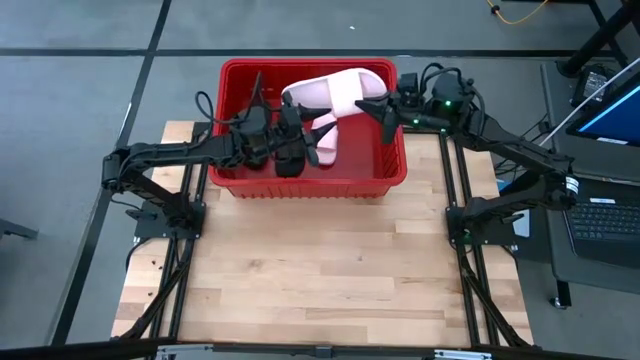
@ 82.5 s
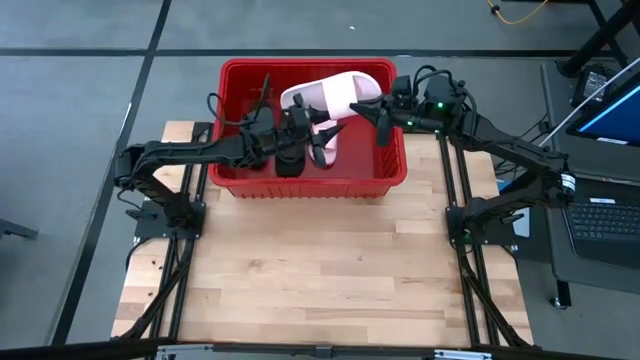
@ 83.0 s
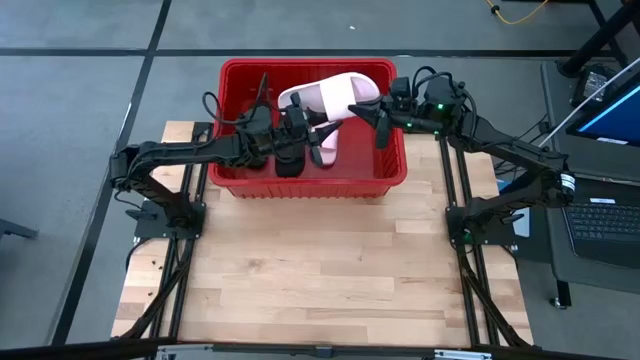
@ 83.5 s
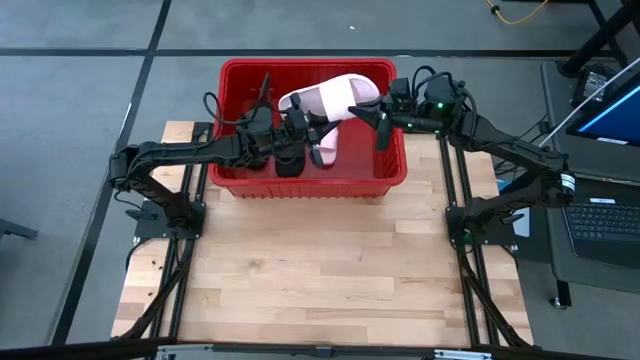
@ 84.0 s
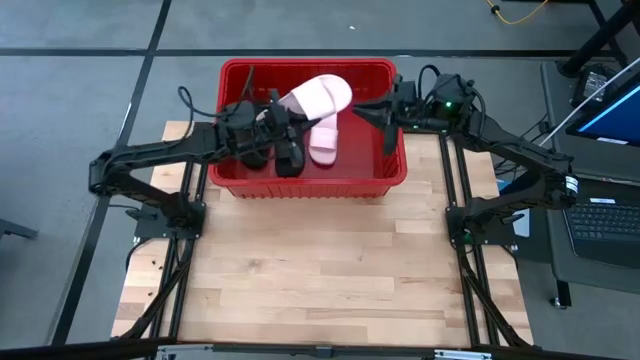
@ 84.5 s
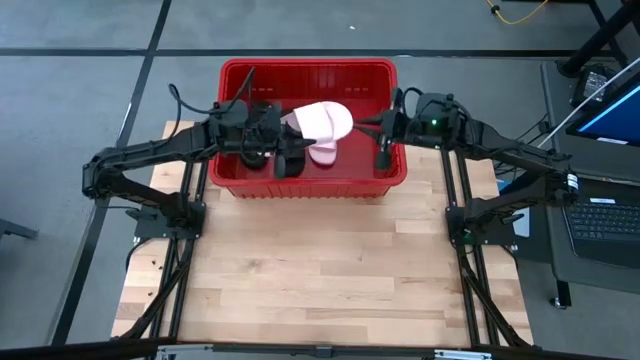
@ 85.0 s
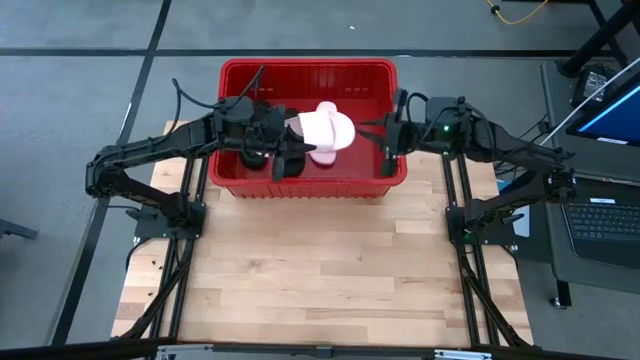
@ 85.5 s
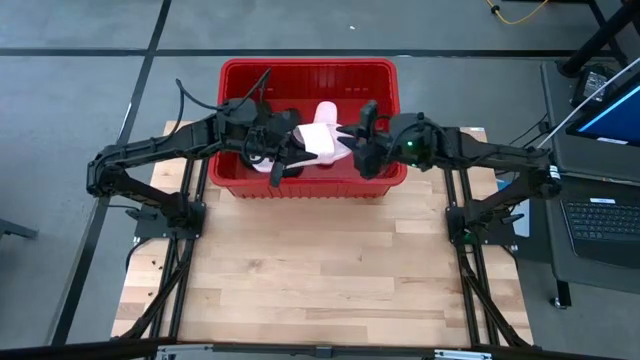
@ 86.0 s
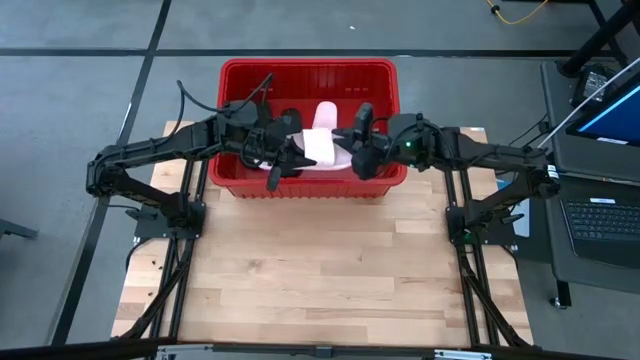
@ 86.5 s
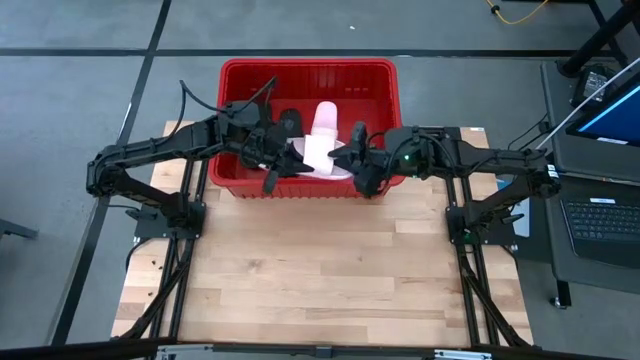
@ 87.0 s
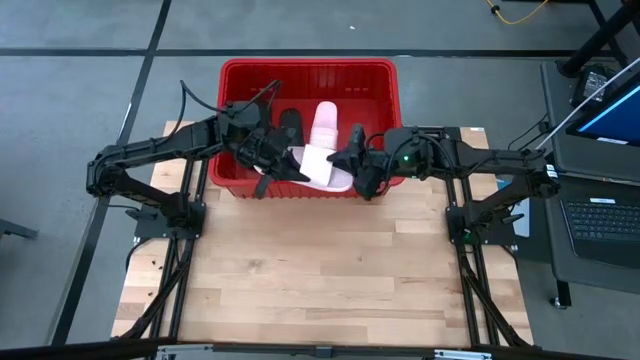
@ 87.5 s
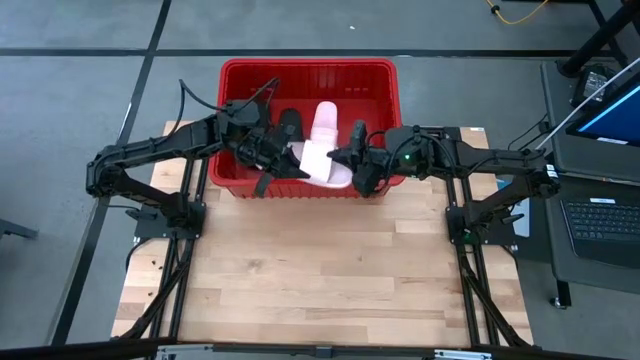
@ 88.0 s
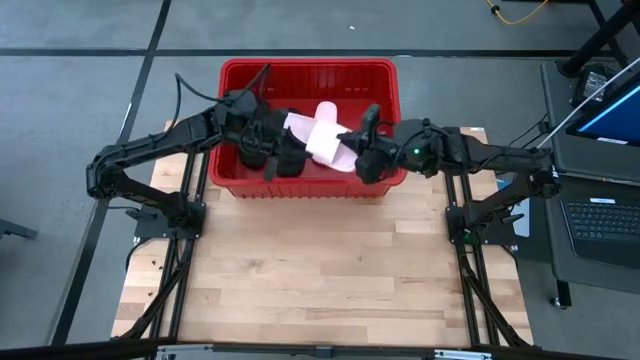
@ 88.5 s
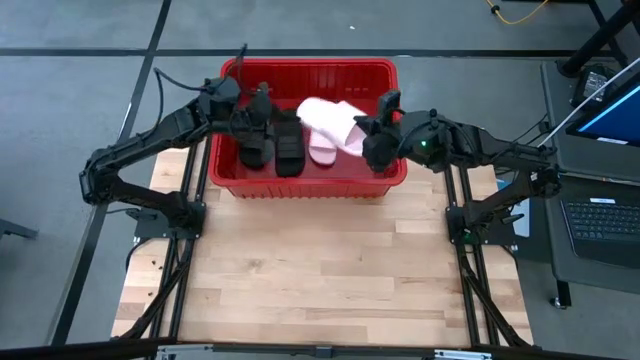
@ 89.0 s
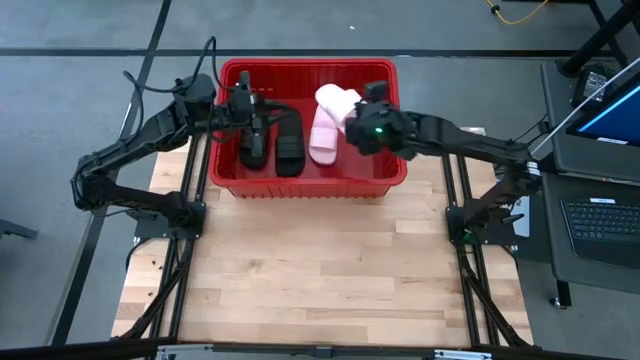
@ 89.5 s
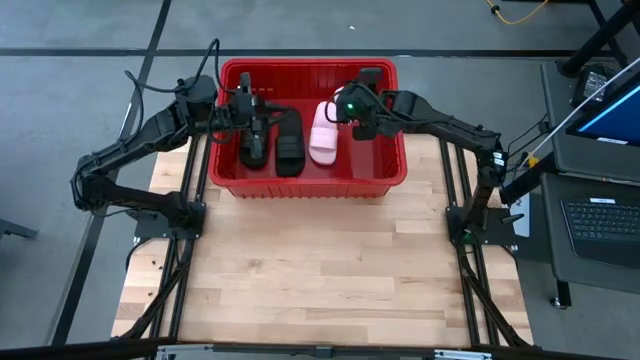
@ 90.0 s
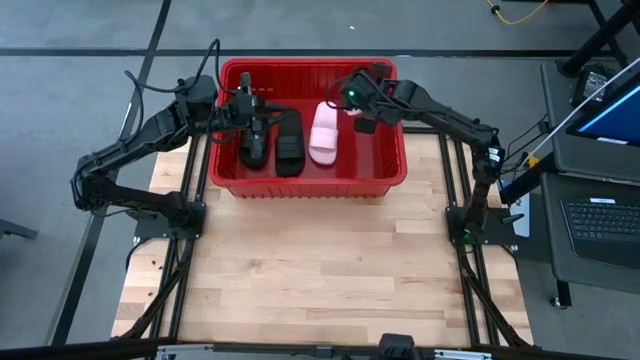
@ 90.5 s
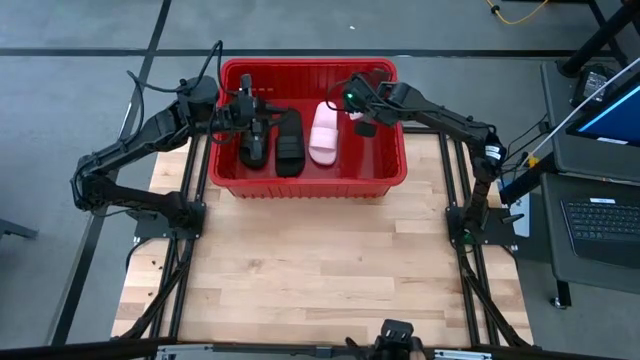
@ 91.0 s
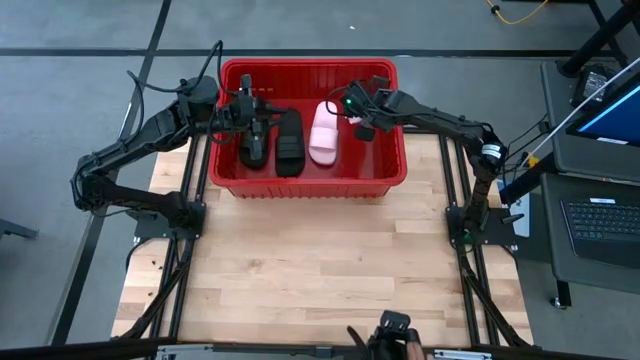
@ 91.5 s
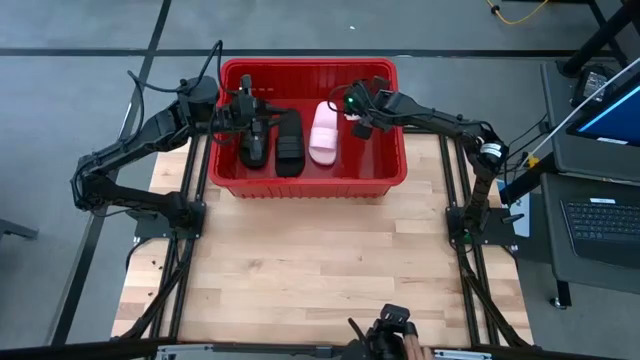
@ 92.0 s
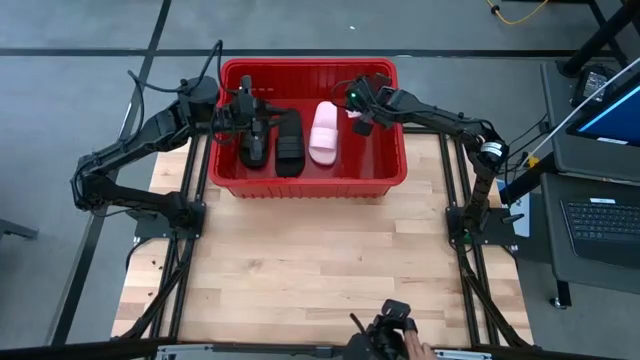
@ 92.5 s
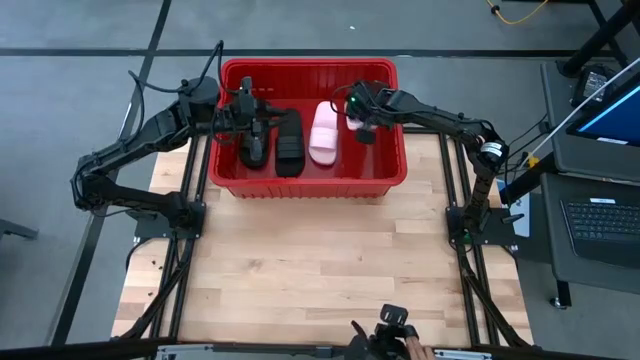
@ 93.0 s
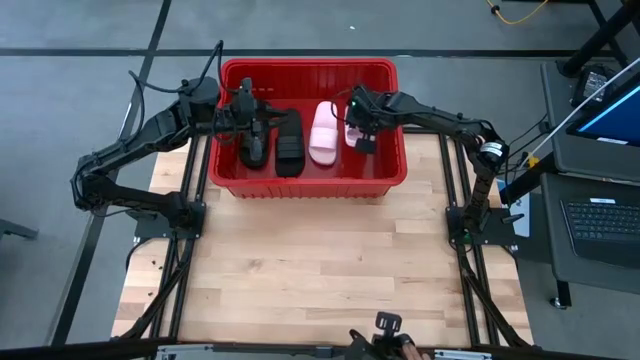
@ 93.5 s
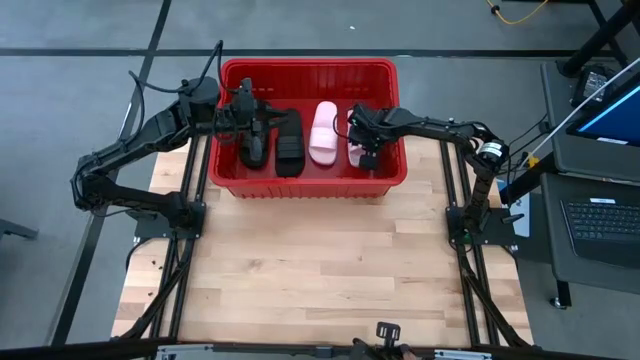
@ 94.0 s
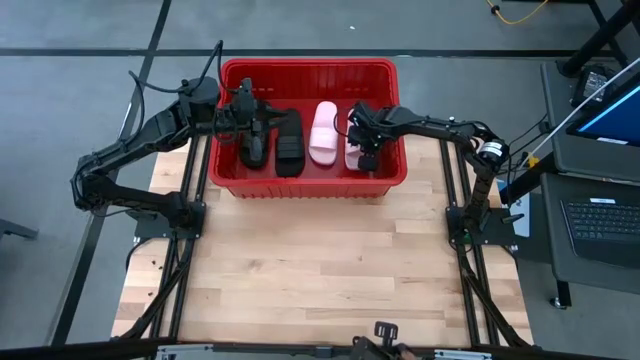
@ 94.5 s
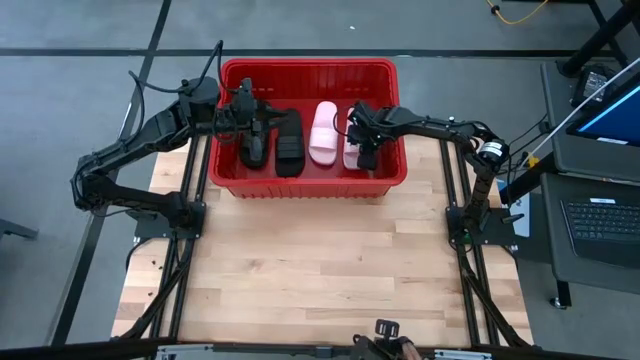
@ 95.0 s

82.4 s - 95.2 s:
Task: Pick and place slides into bin
Put the pink slide into the red bin

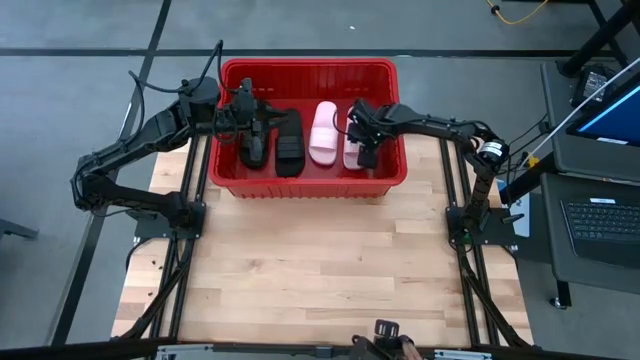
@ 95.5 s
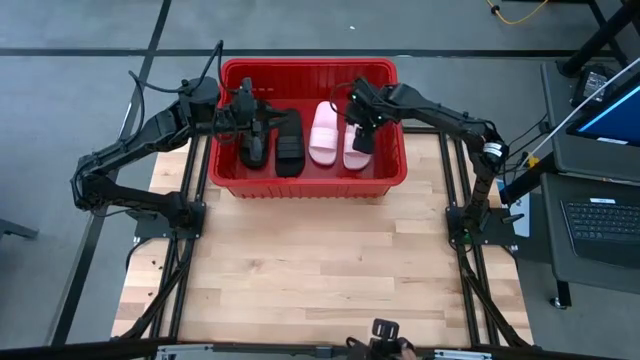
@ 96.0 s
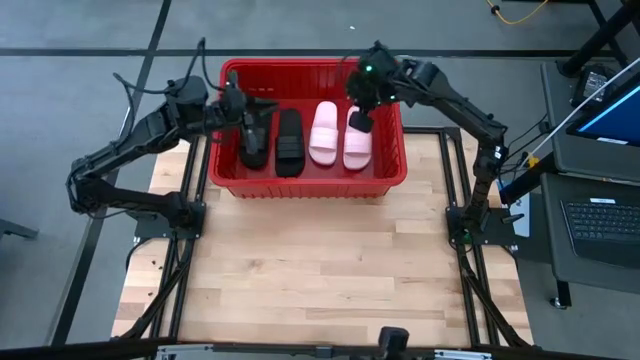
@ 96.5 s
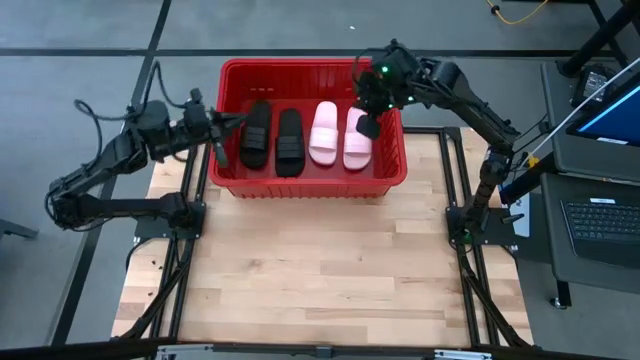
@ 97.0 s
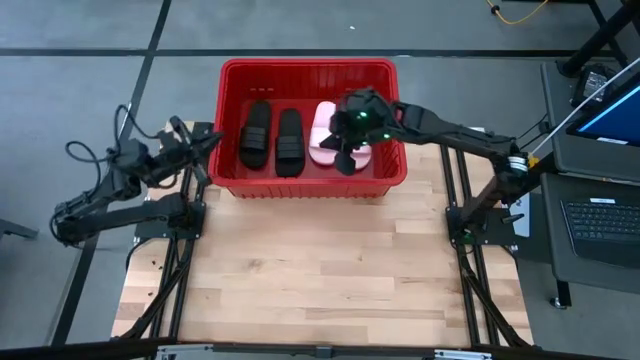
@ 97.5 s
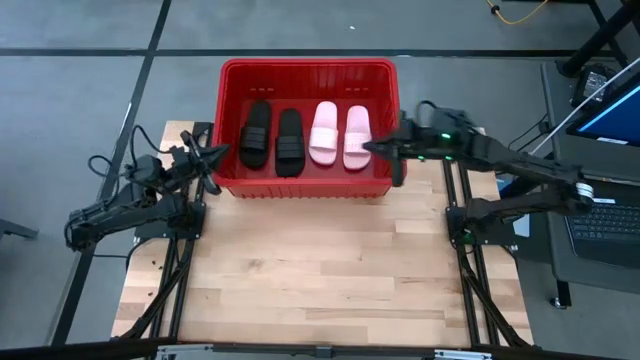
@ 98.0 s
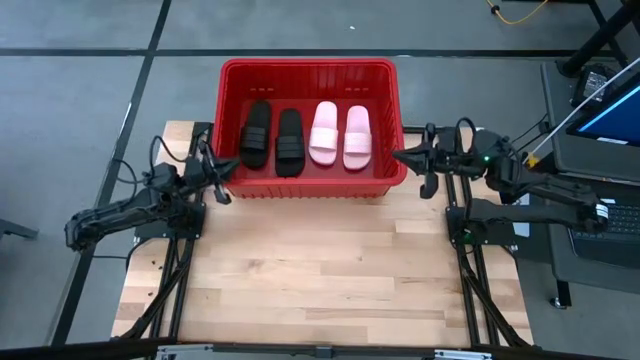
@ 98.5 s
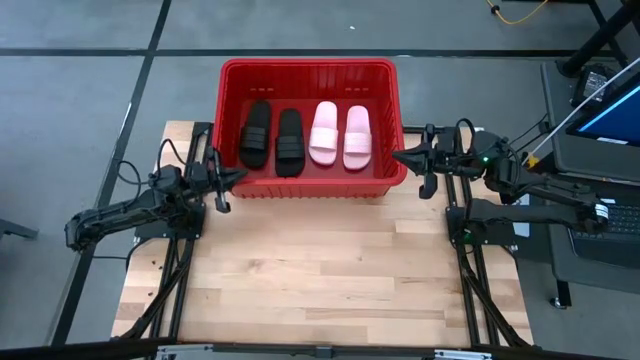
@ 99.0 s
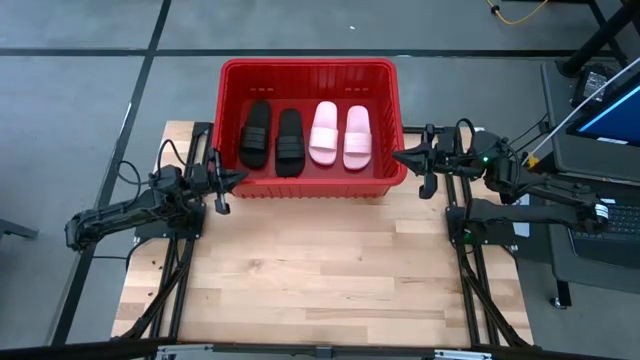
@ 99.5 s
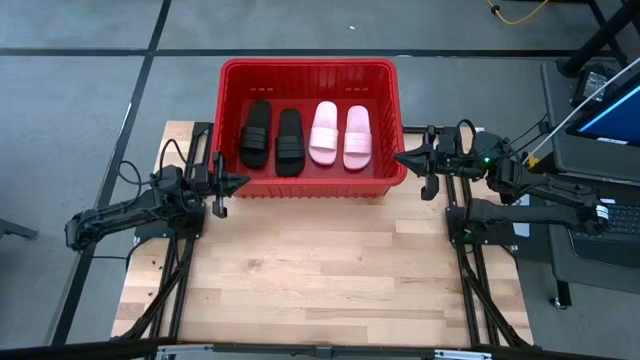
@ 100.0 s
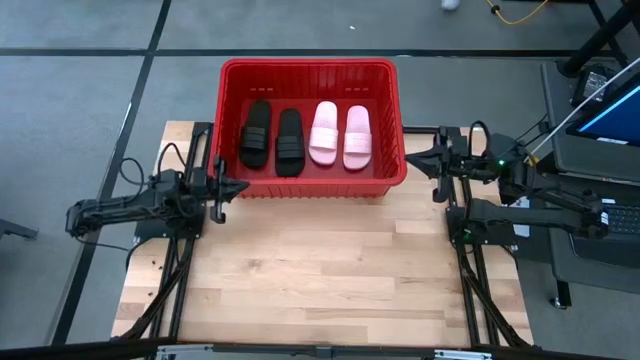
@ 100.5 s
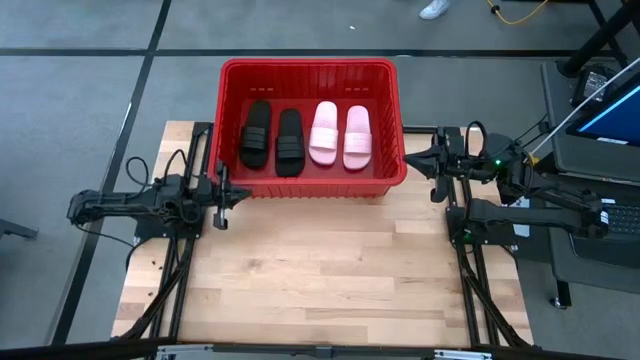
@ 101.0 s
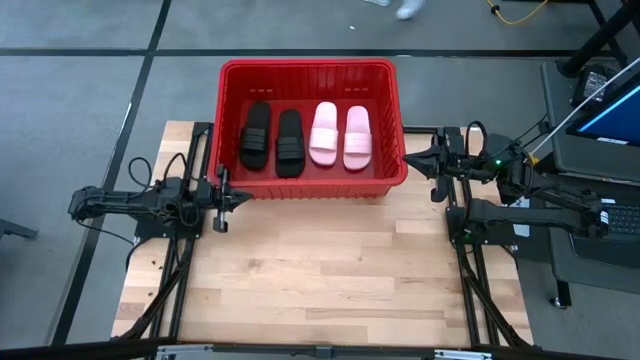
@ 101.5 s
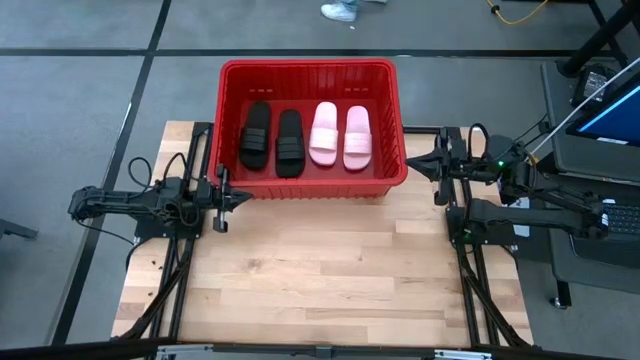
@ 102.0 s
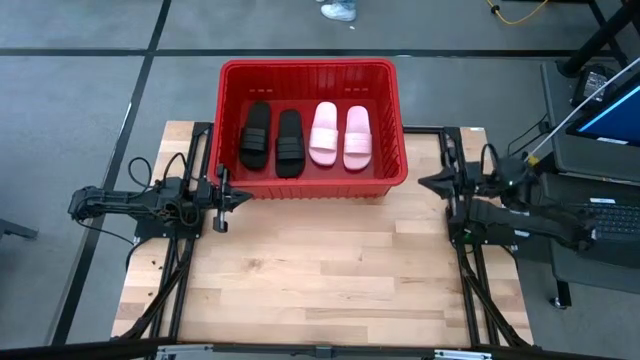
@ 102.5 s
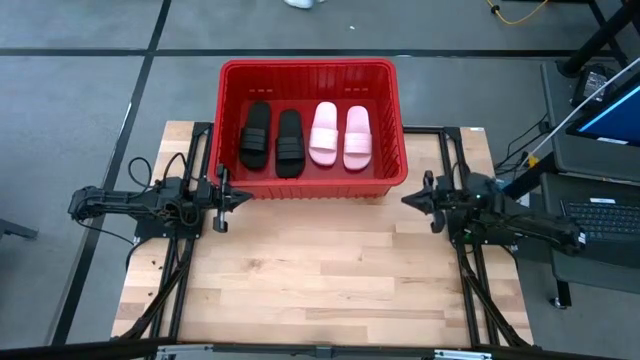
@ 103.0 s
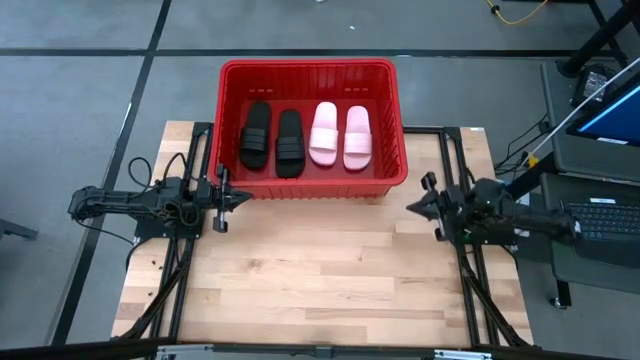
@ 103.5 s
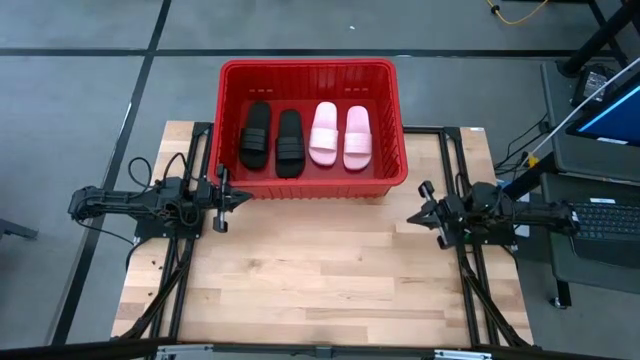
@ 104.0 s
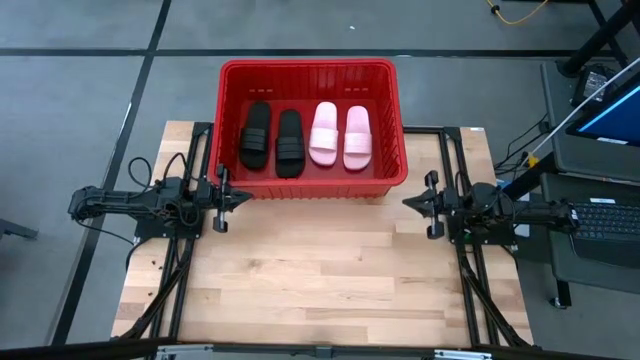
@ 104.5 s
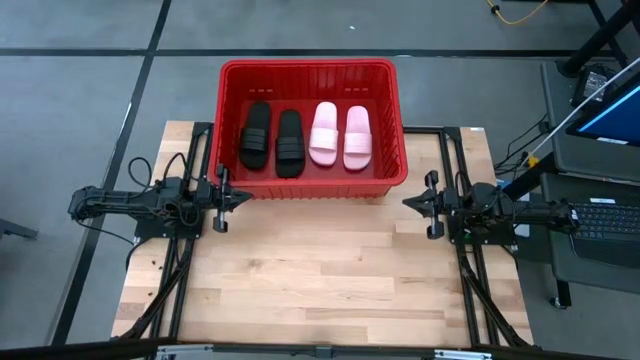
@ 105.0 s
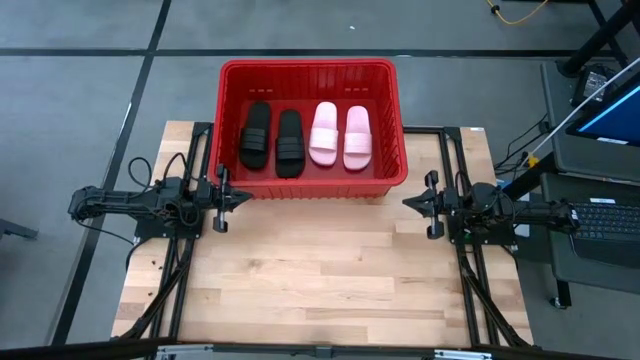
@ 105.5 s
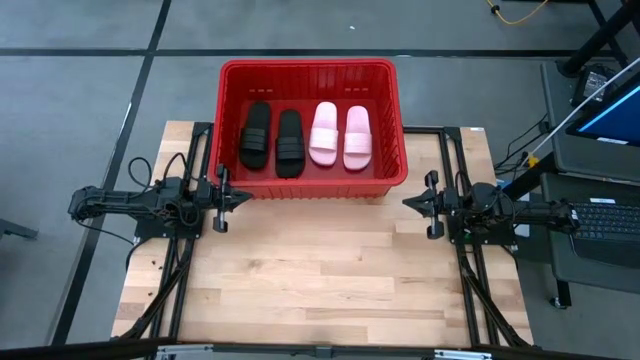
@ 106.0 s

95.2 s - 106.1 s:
Return to Home Position
